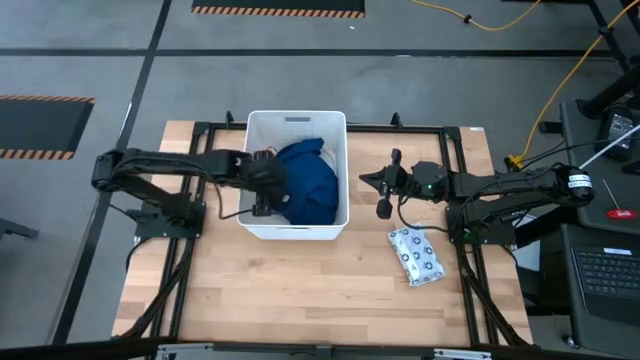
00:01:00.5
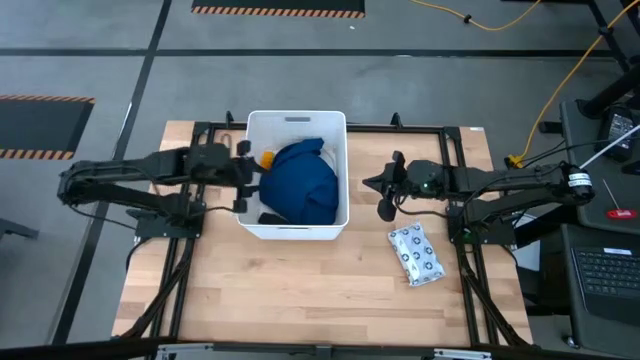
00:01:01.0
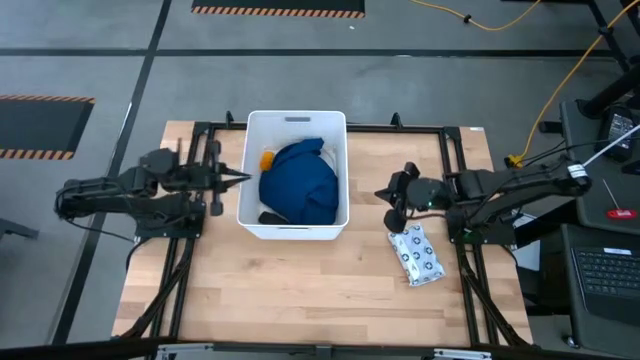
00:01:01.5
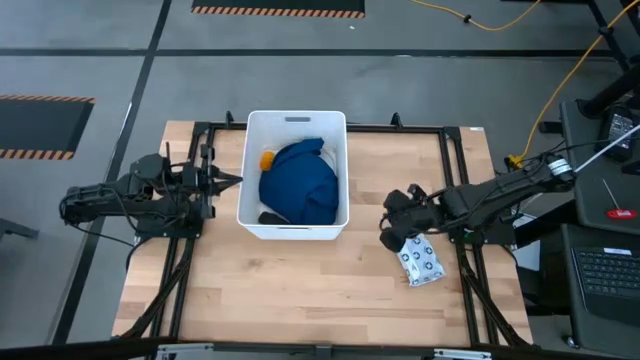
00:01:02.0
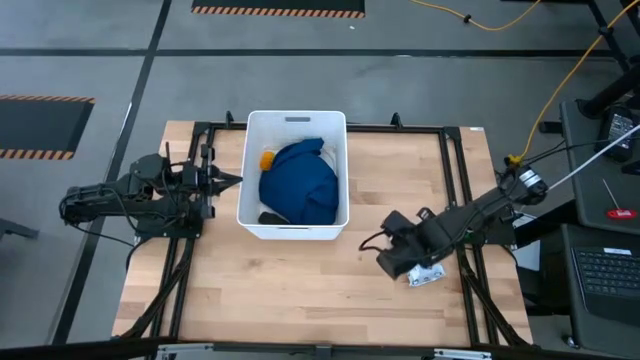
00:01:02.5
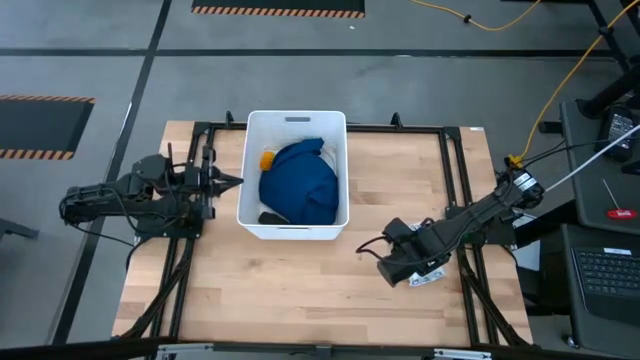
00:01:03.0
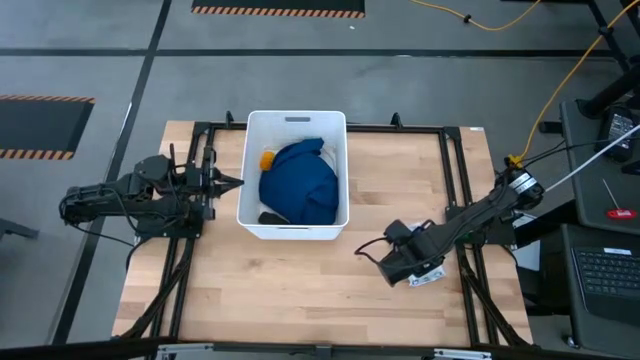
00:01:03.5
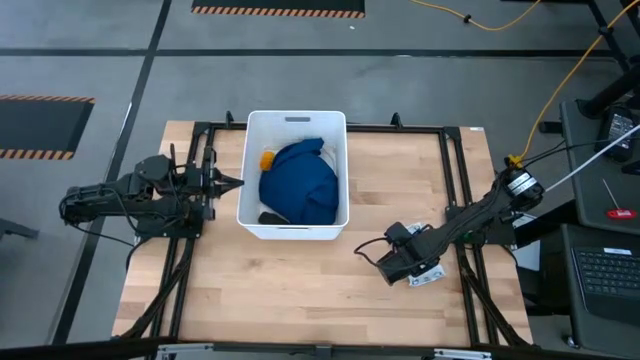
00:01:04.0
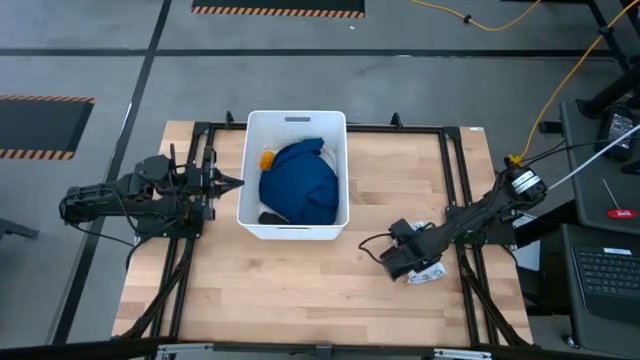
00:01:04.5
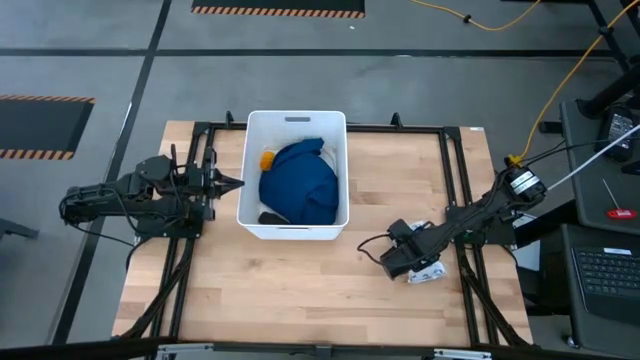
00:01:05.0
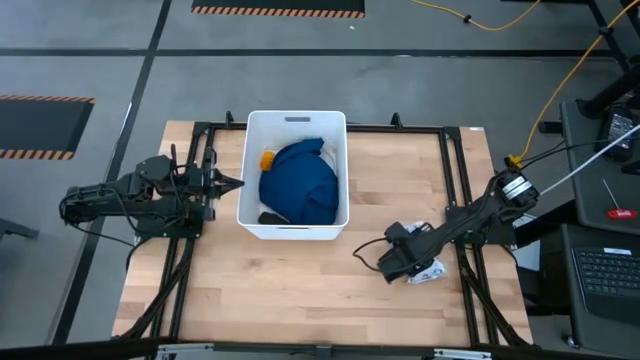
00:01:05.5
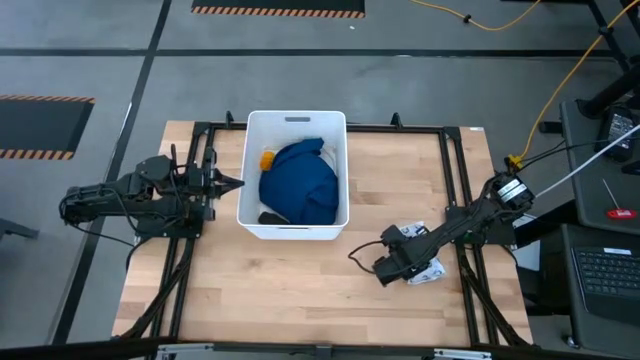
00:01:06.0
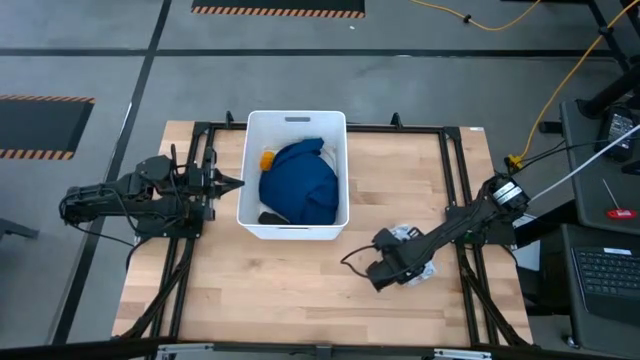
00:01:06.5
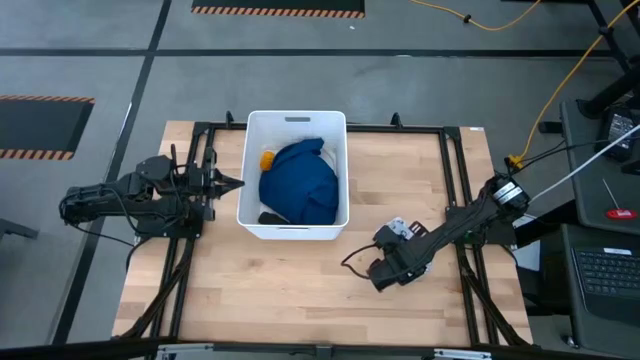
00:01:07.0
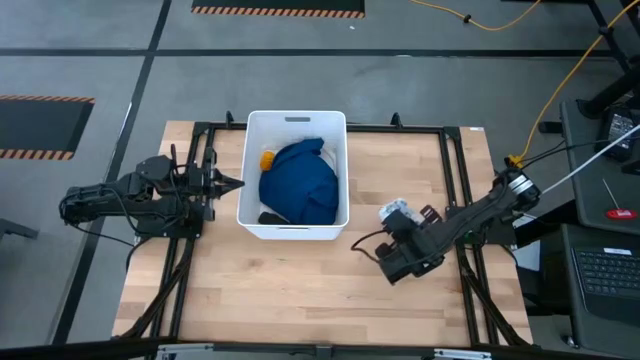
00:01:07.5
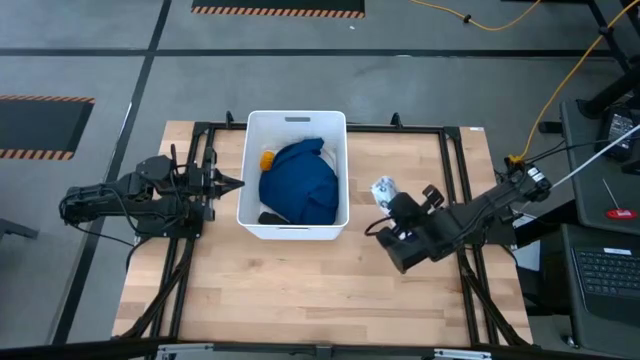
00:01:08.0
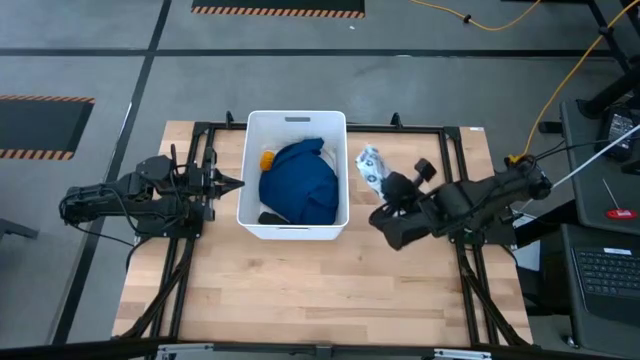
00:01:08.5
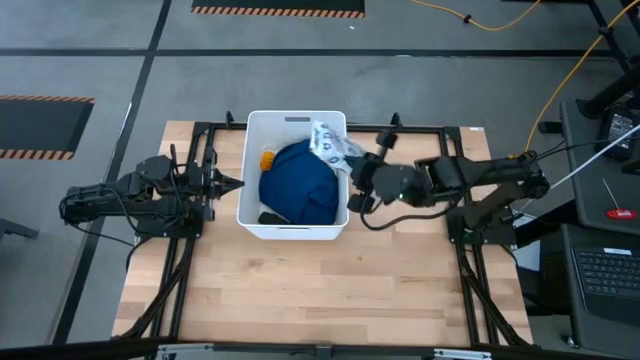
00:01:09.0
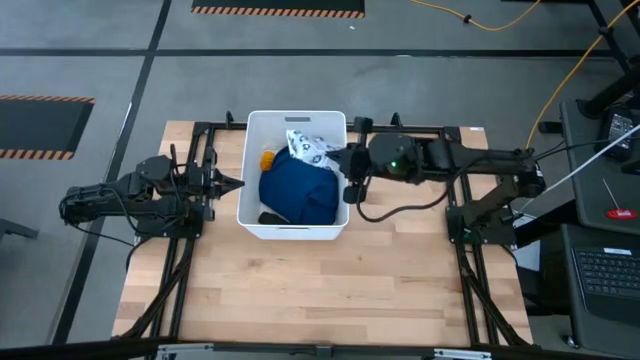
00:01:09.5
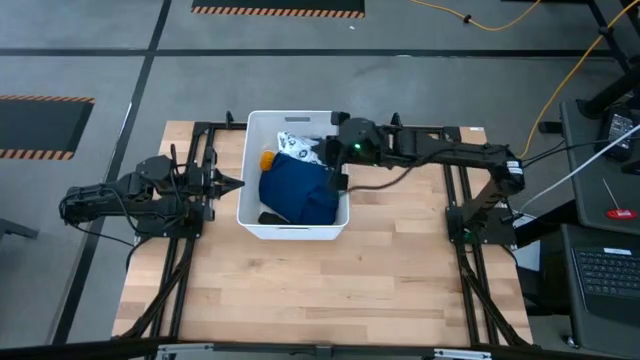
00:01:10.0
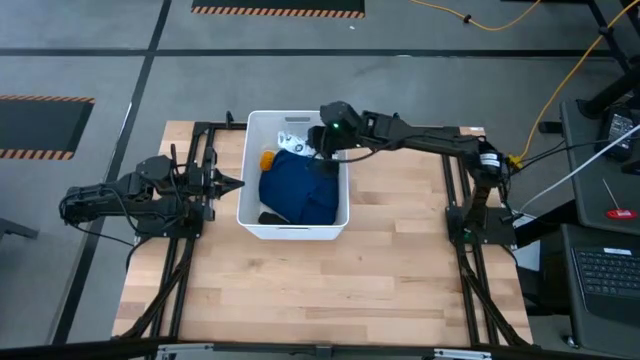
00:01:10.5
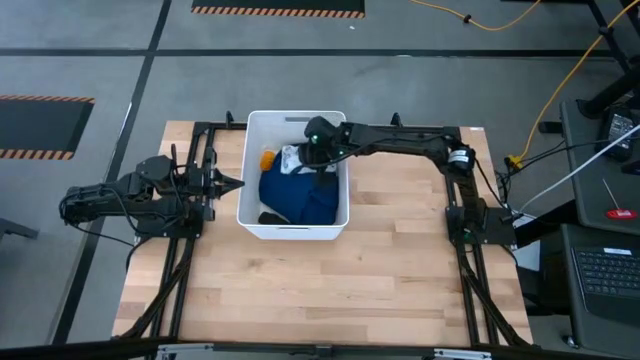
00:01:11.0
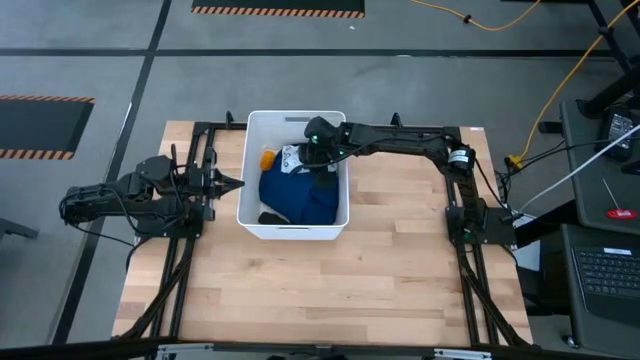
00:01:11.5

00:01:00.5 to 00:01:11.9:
Task: Pick & place medical supplies in basket/bin
Put the white bag into the white bin

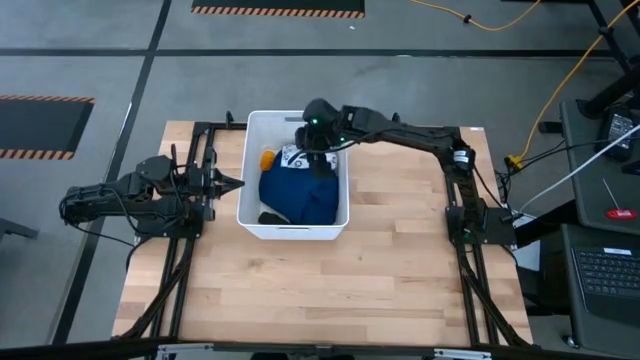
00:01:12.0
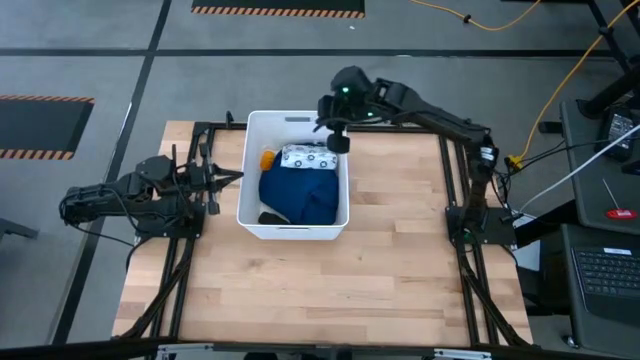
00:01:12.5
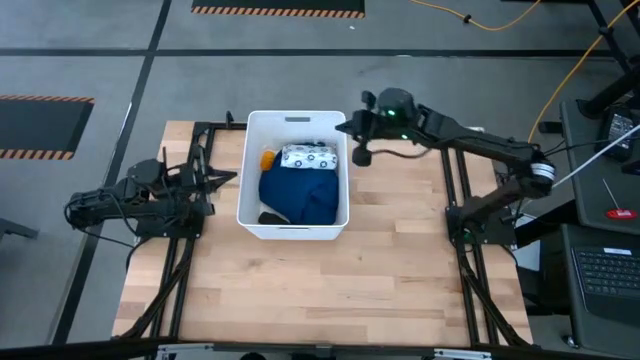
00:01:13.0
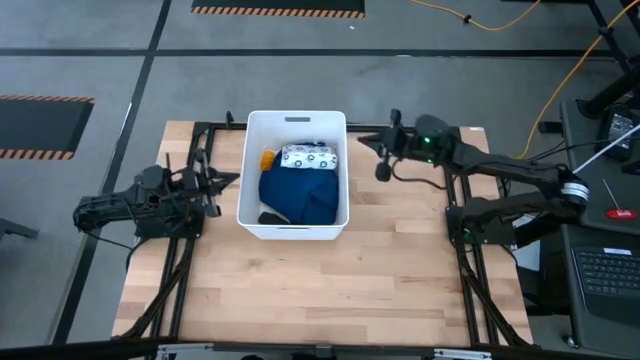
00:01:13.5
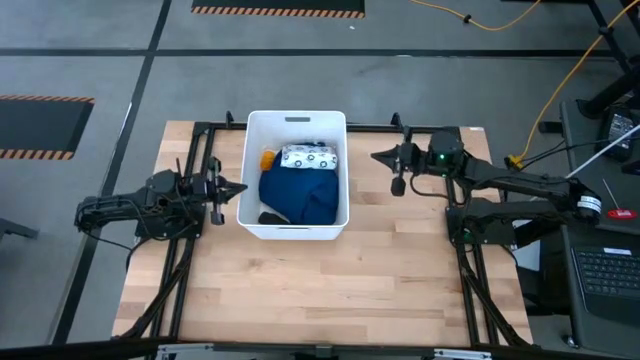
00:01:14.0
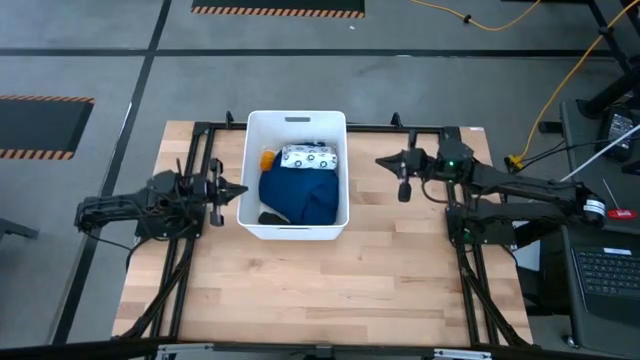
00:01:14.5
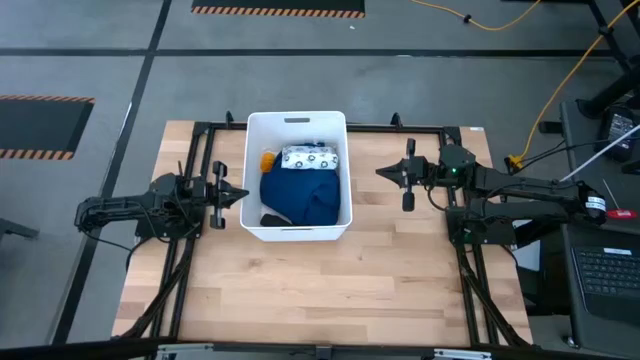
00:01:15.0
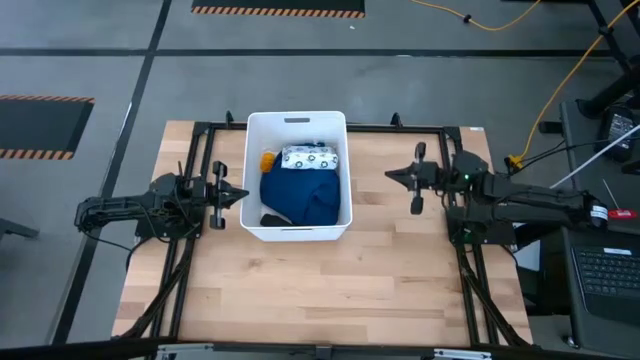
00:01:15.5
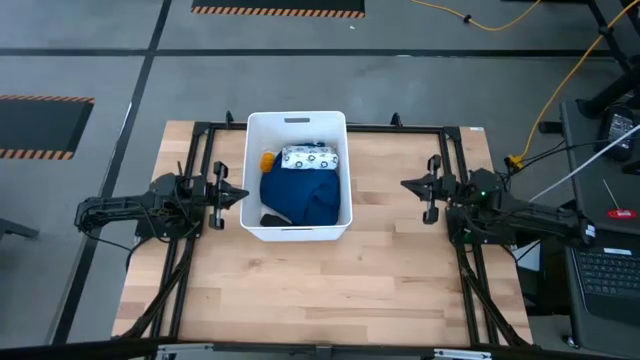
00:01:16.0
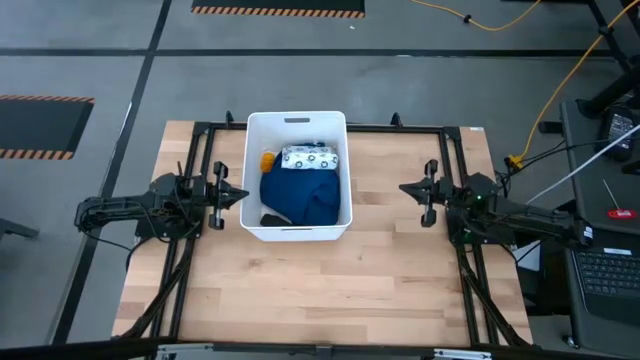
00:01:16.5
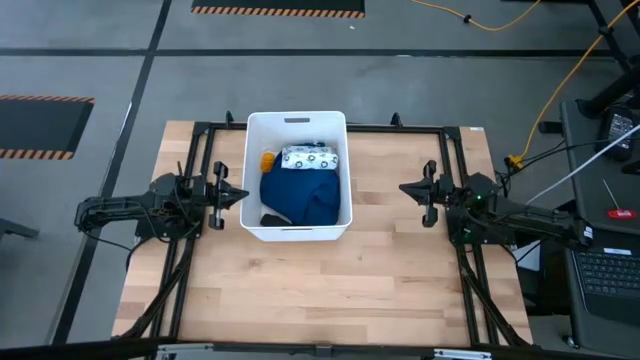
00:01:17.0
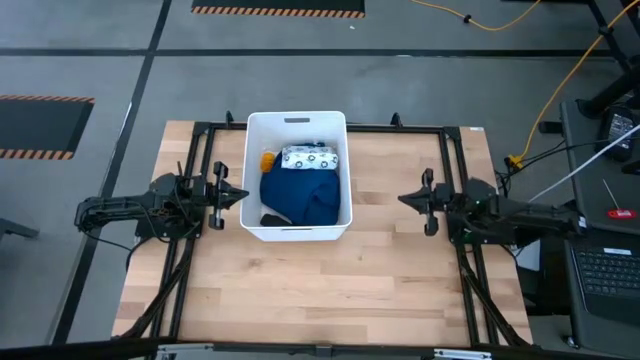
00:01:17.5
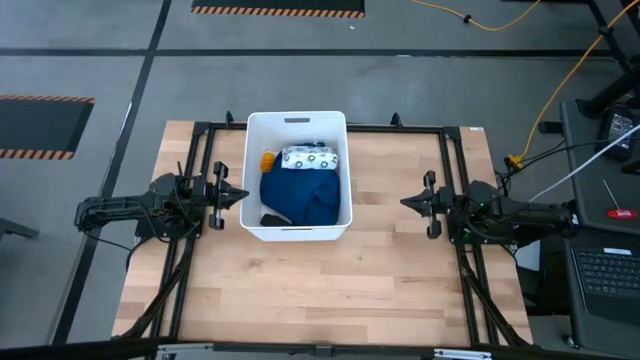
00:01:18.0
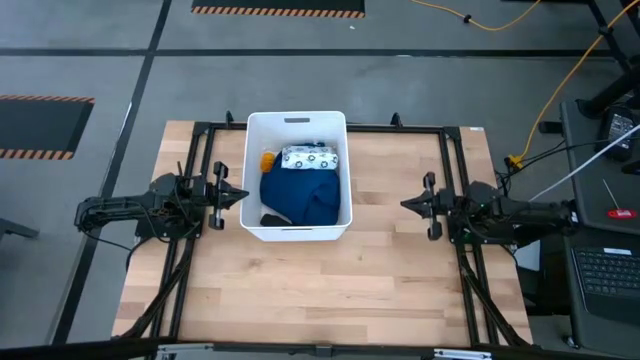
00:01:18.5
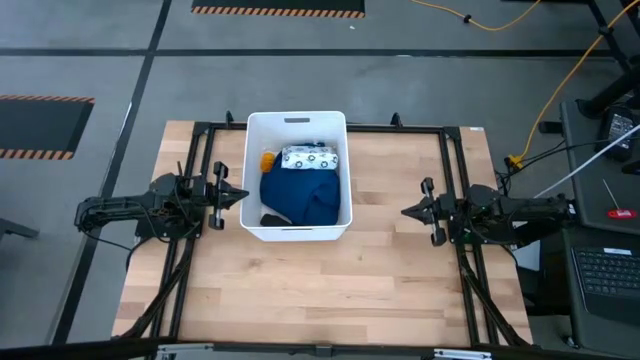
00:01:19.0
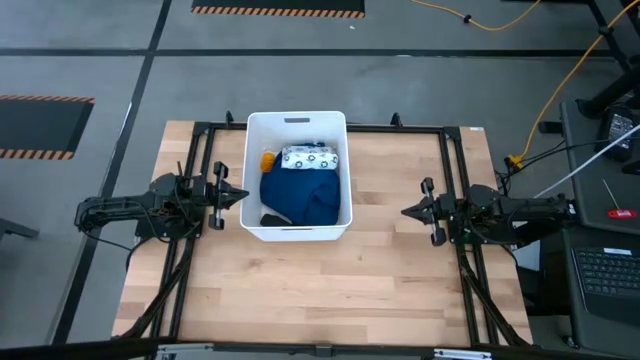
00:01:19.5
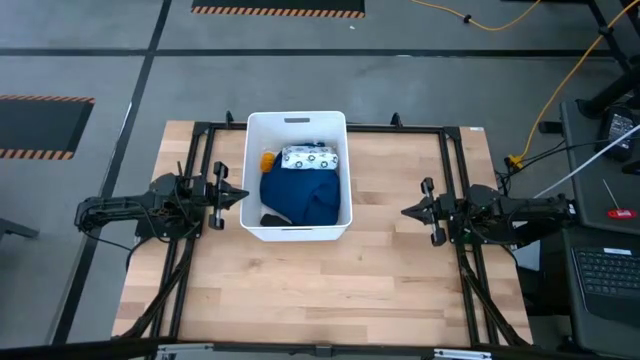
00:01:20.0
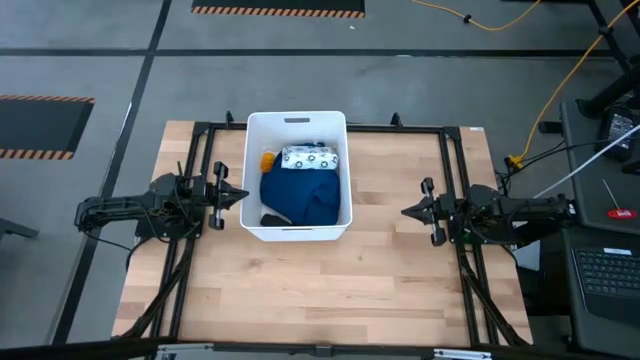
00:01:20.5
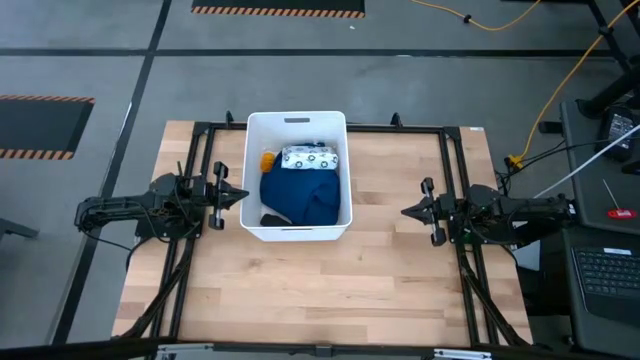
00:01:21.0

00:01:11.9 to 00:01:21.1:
Return to Home Position

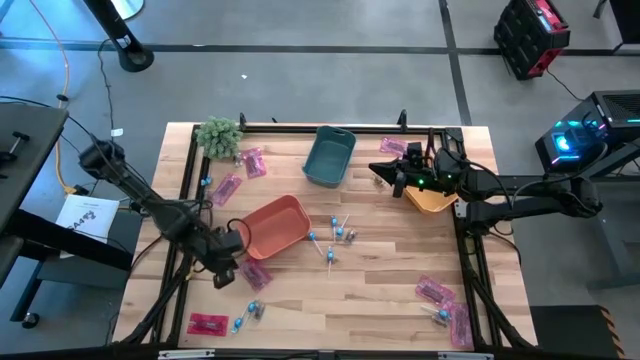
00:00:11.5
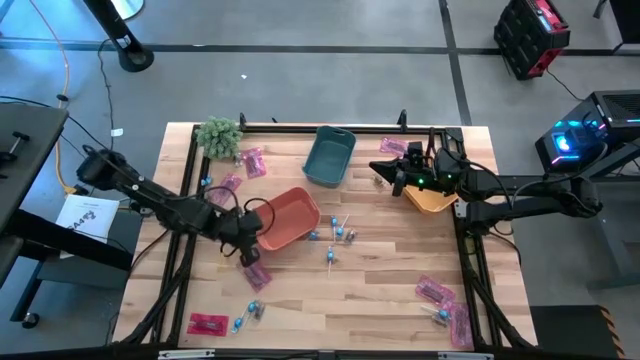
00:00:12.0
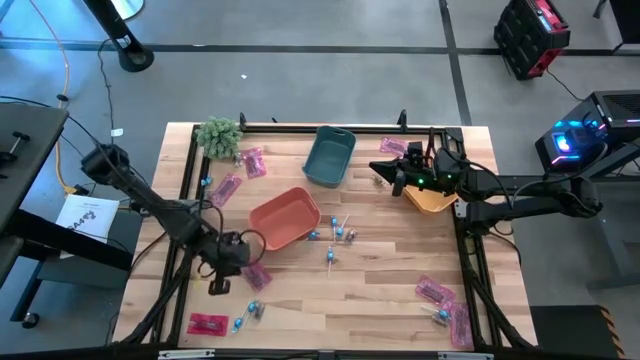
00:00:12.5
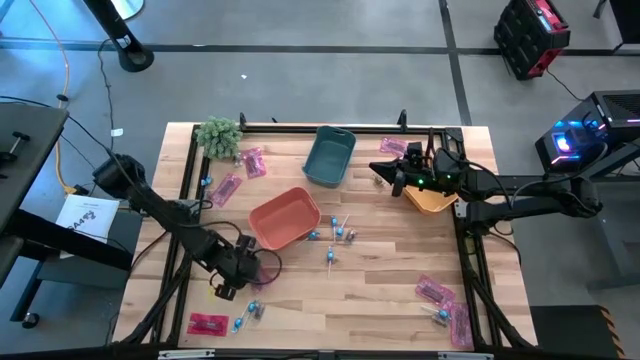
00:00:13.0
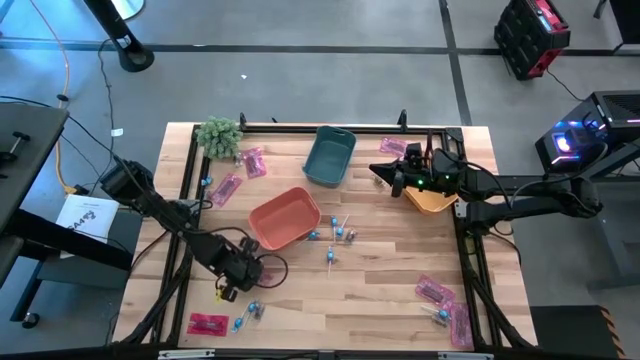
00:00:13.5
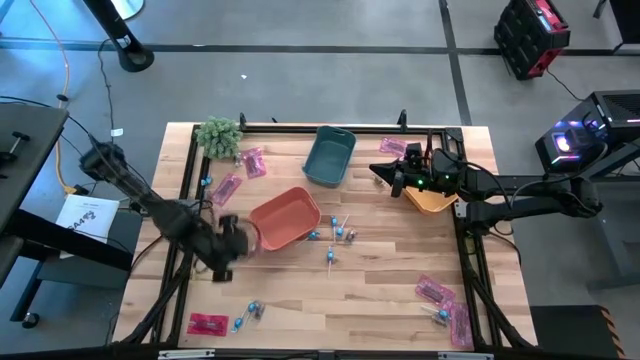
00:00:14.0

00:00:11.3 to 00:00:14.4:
Task: Sort candy
Put the red candy into the orange bin
